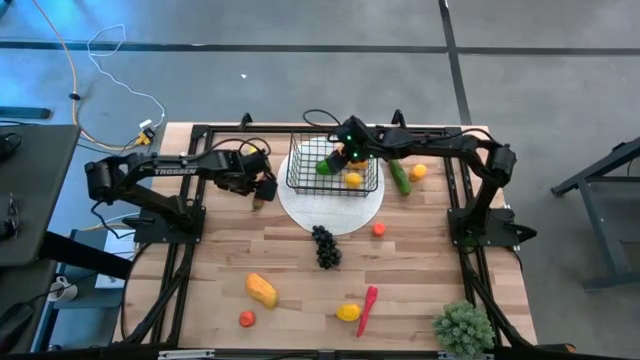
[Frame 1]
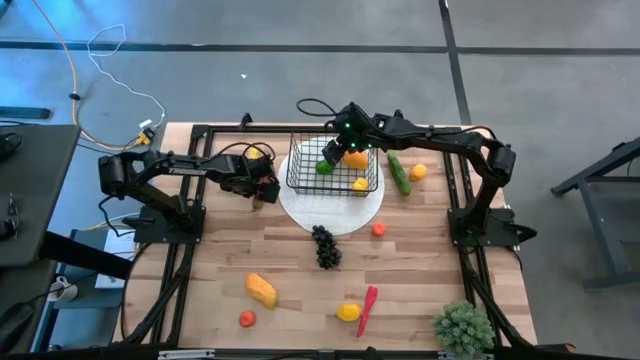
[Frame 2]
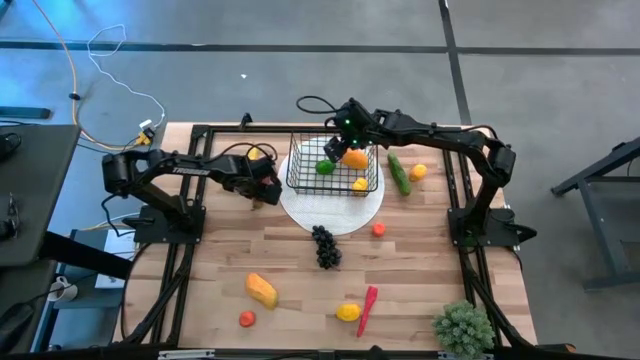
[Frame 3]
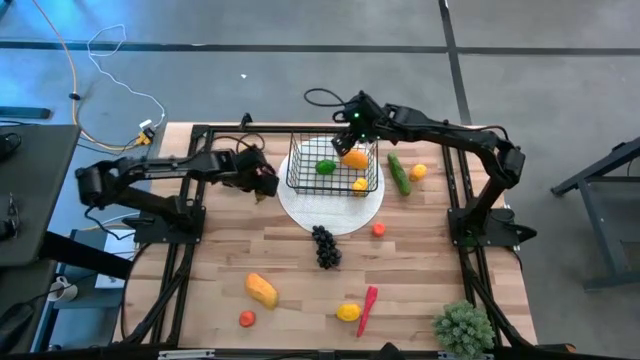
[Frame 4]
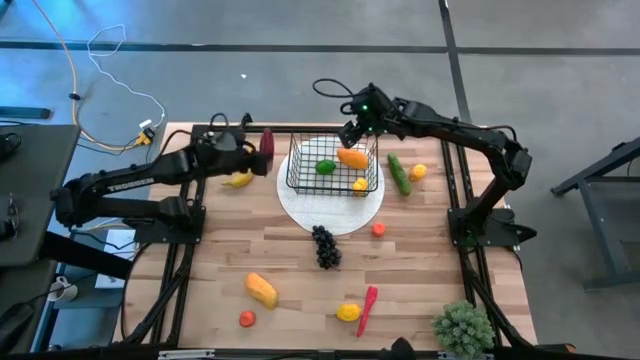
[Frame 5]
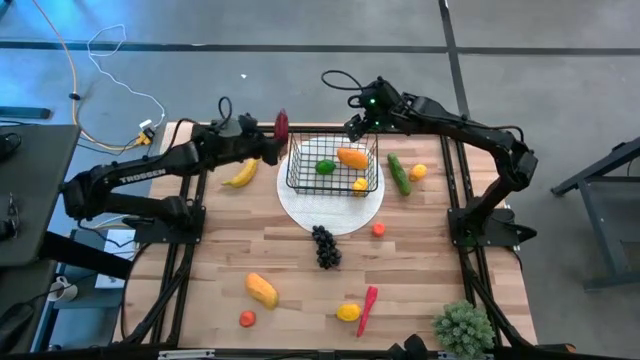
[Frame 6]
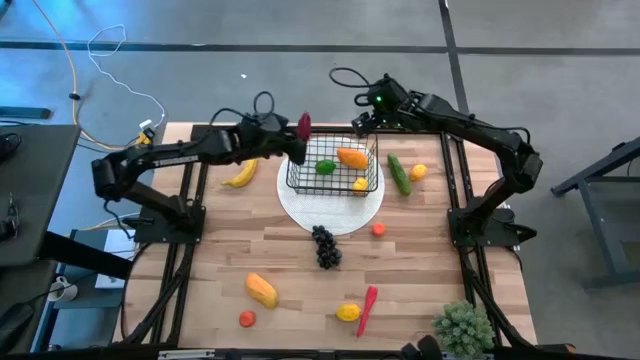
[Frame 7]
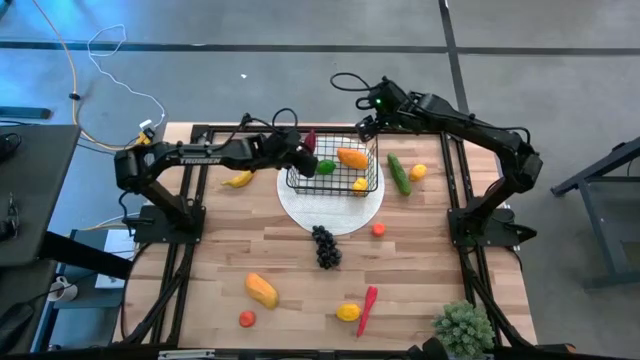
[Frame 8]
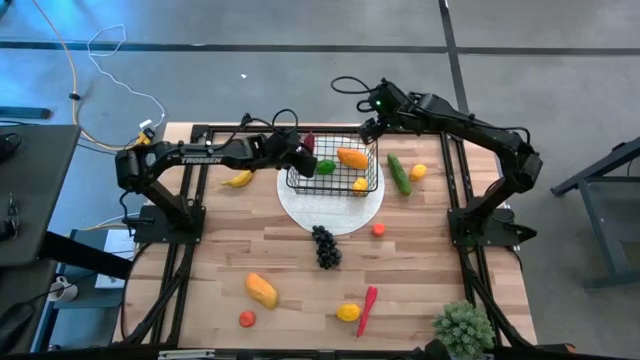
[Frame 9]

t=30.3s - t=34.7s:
Task: Build produce basket
Put the dark red chili pepper into the wire basket

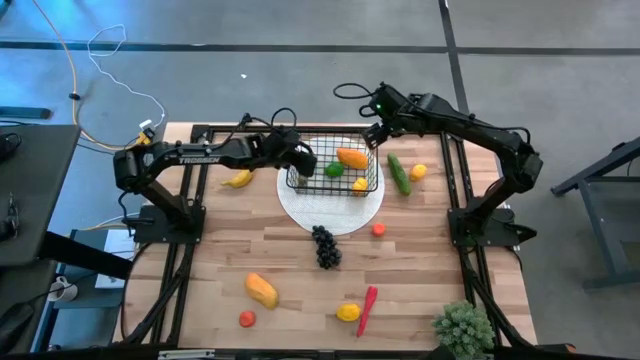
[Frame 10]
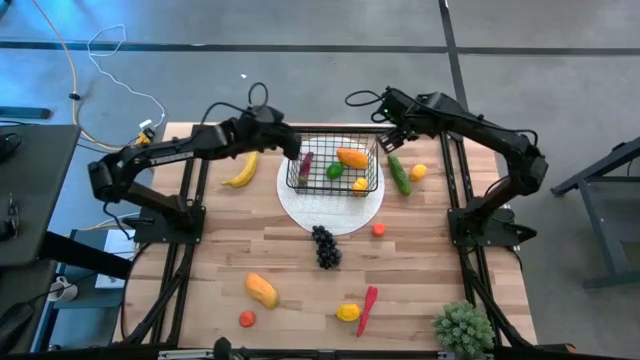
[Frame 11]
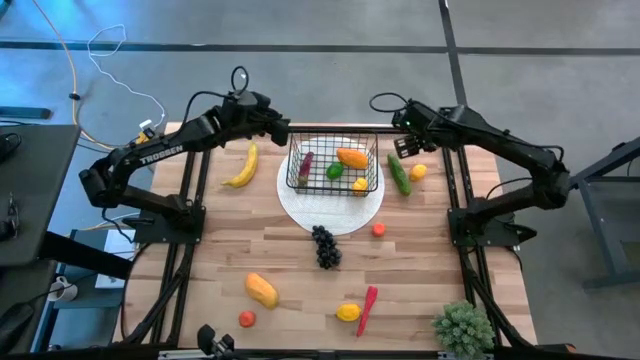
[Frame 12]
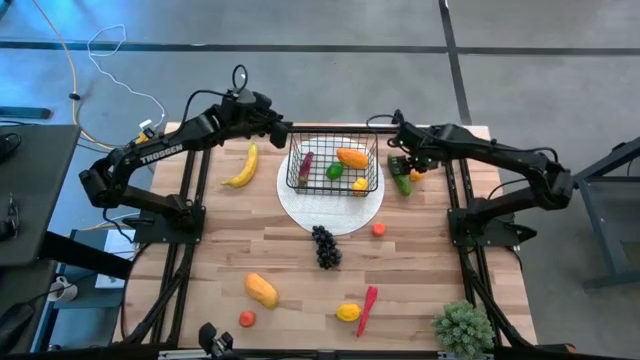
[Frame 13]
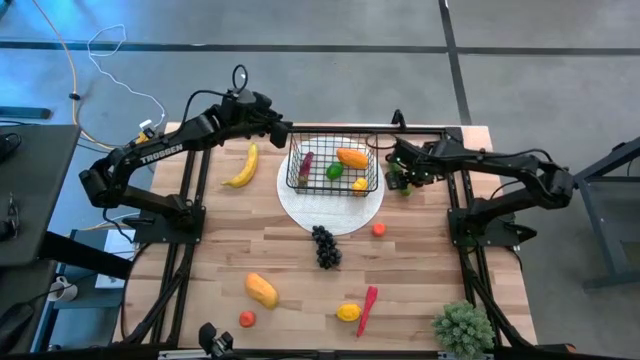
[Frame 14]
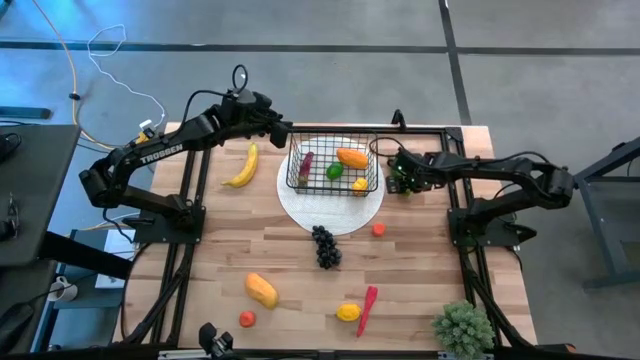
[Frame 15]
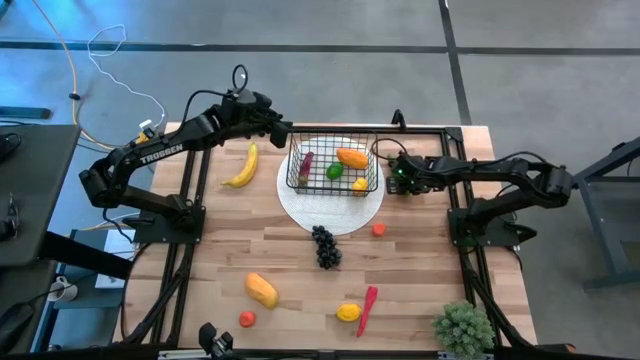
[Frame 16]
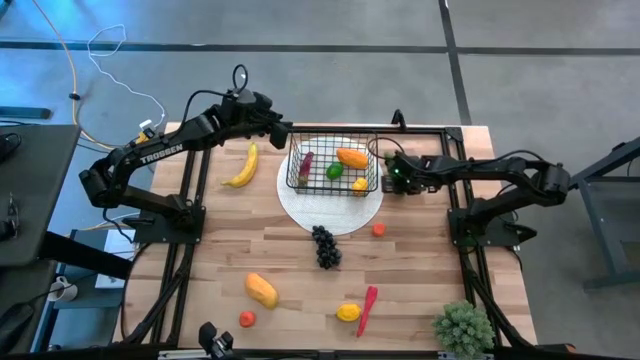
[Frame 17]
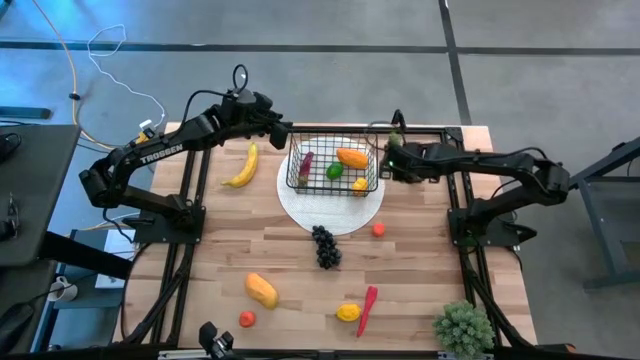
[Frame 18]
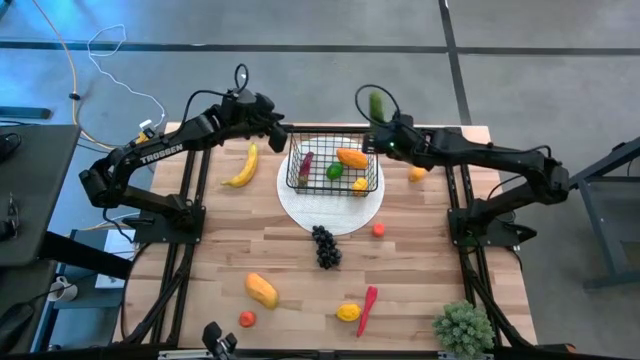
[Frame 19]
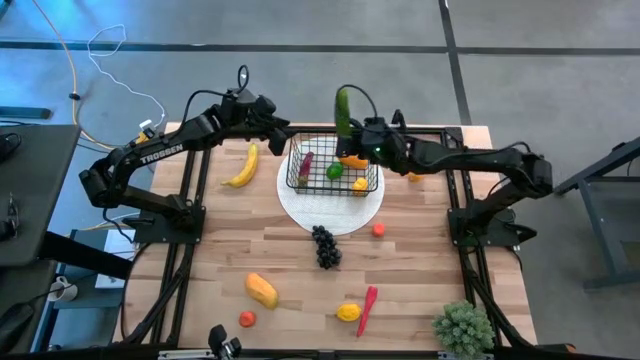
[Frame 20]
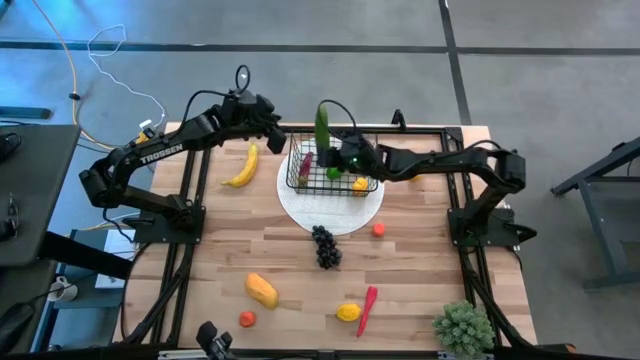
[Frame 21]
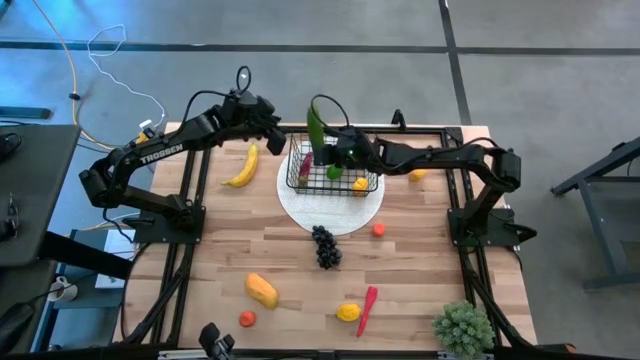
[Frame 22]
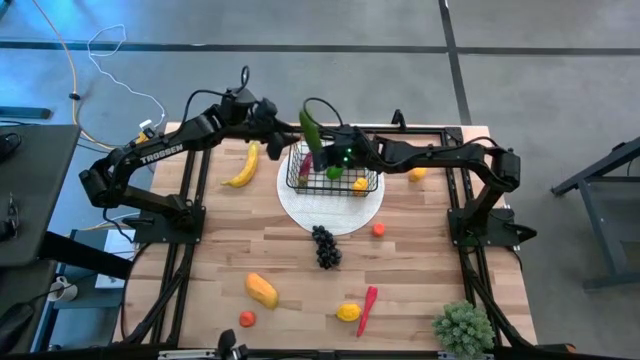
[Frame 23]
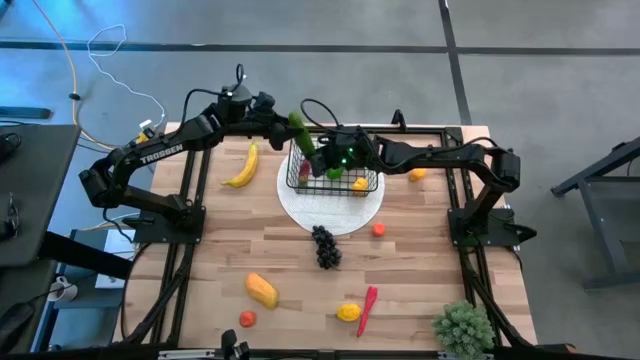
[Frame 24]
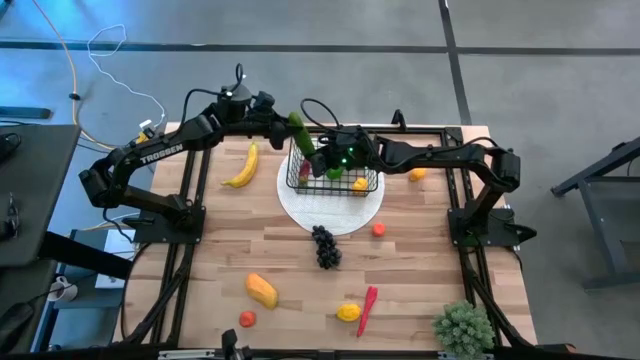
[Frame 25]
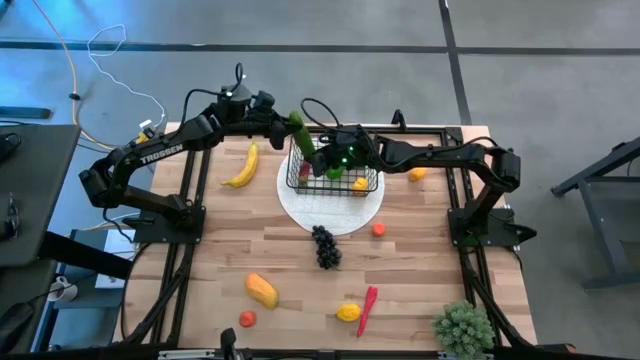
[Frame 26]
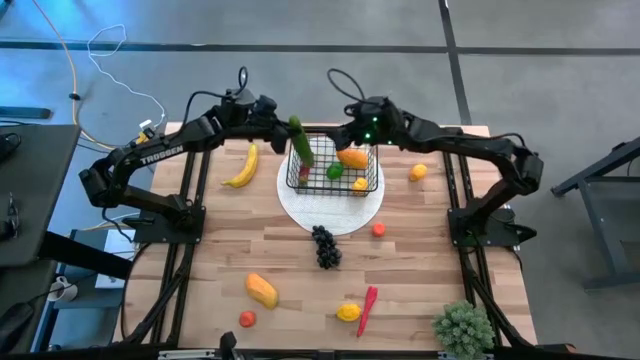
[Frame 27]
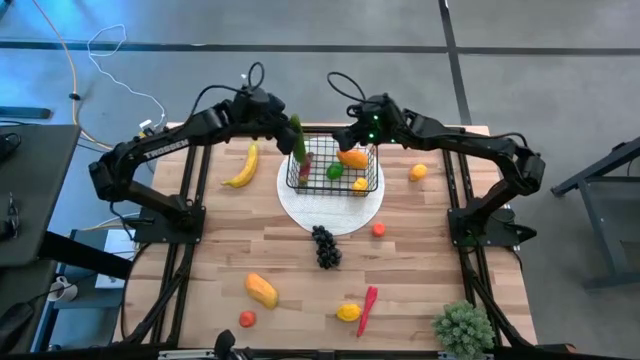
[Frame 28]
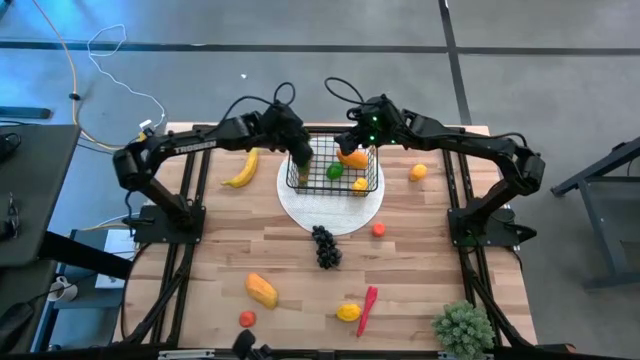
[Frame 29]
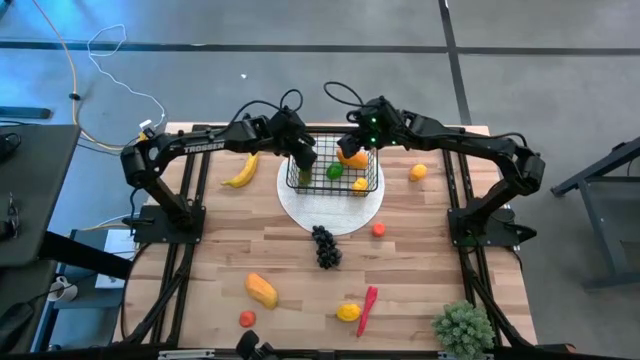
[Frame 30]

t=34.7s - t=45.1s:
Put the green cucumber into the wire basket

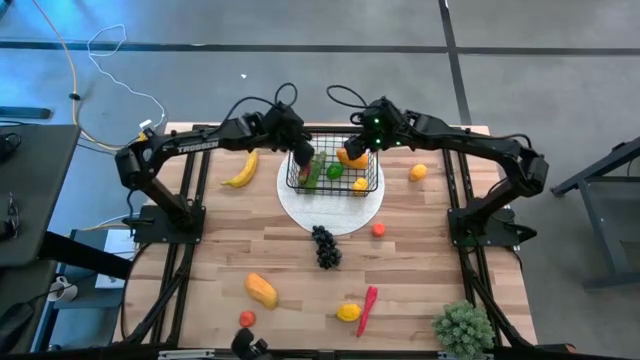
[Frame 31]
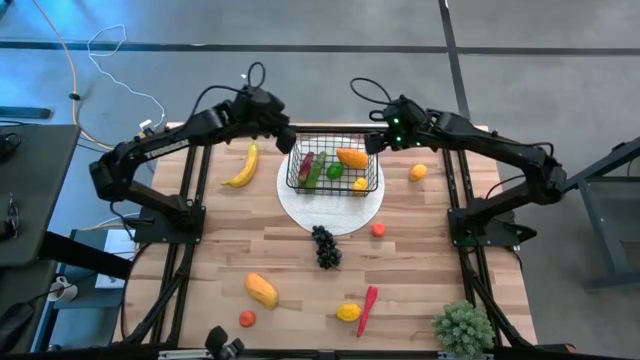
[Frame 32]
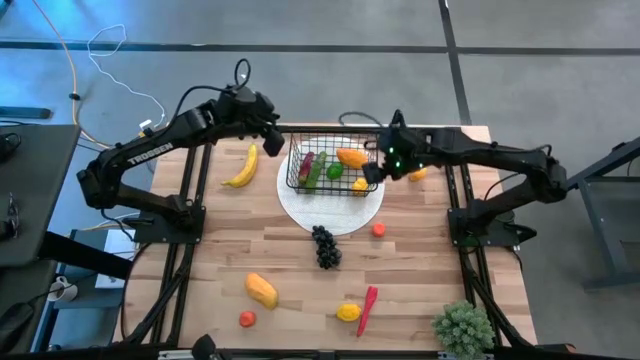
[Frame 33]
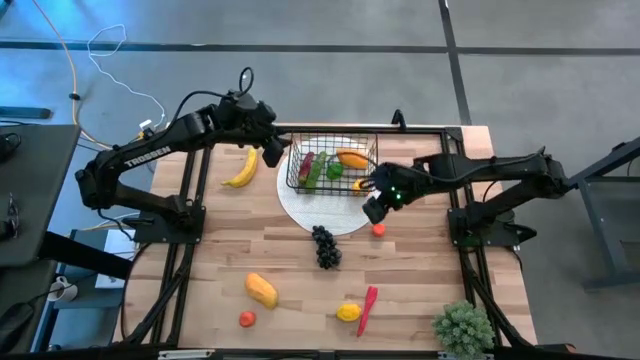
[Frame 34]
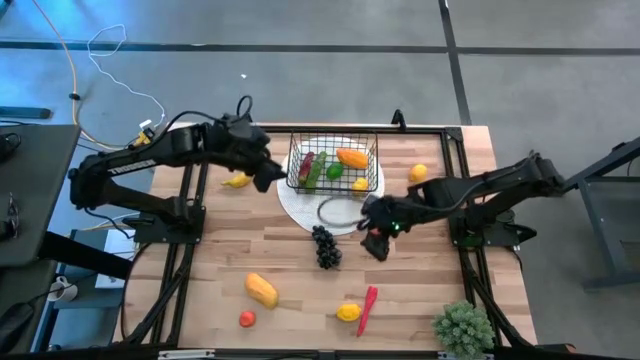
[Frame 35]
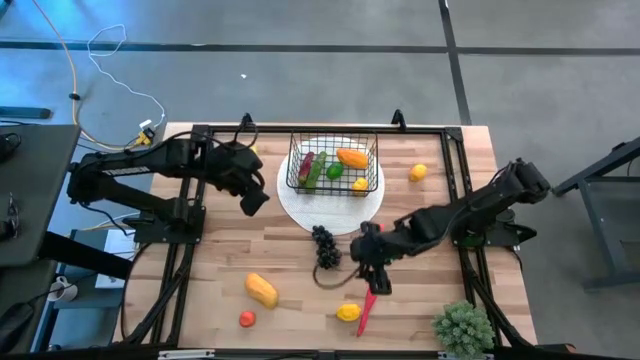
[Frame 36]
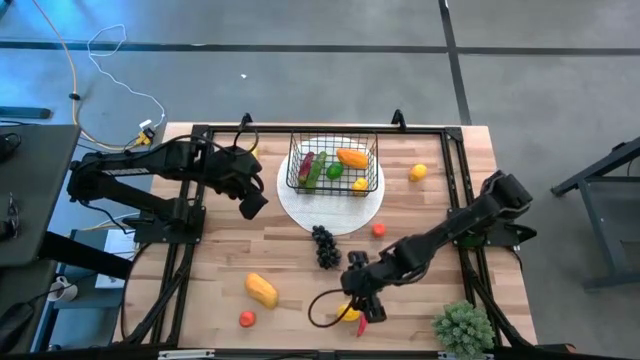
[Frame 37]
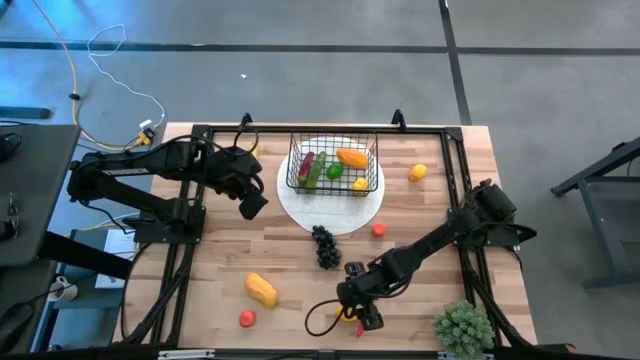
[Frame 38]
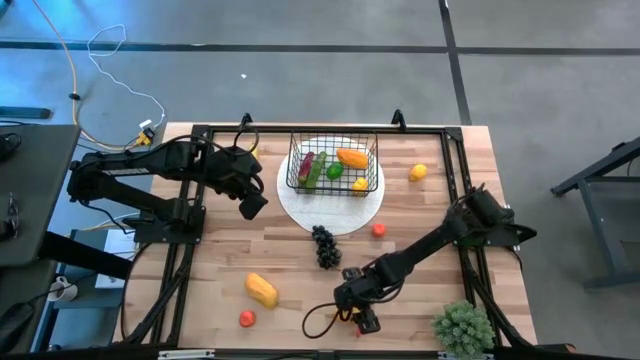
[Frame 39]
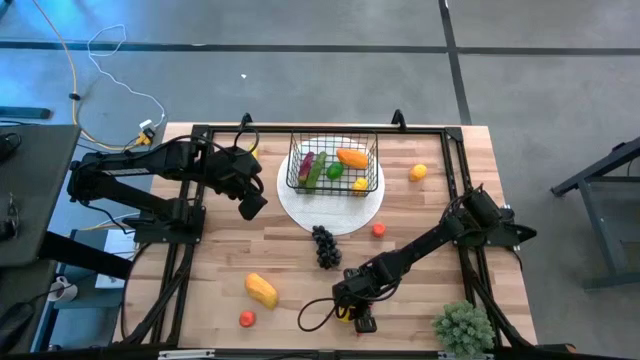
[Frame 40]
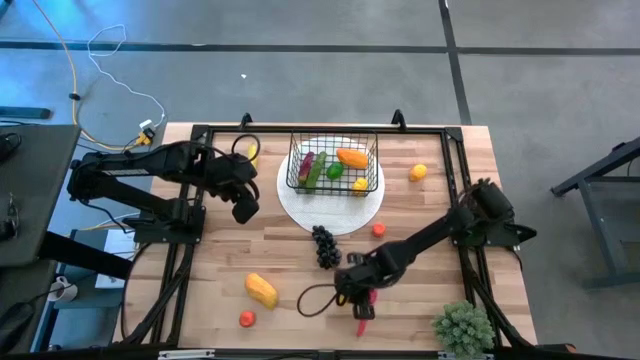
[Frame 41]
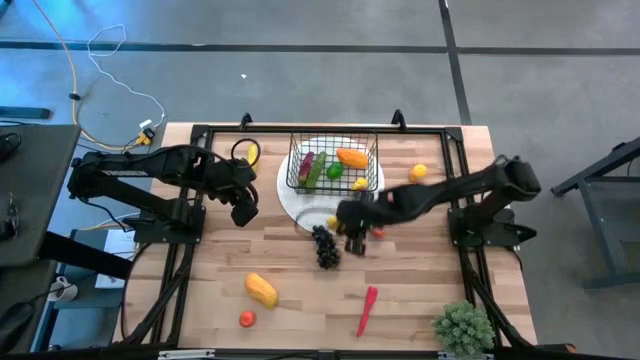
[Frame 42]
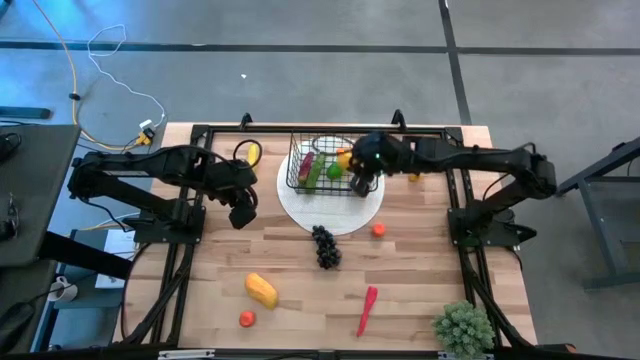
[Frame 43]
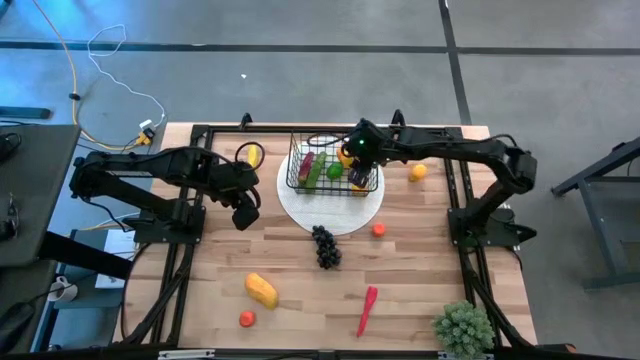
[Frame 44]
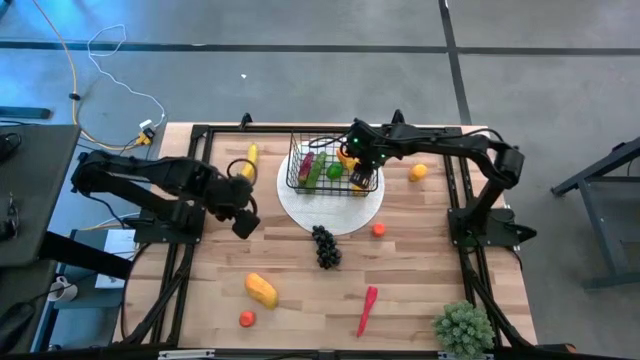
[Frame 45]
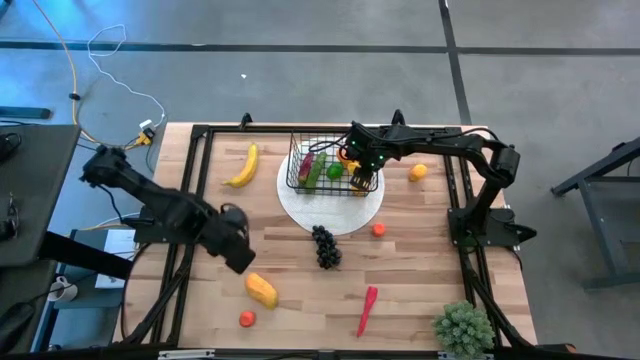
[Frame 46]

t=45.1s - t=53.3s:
Put the bottom yellow lemon into the wire basket
